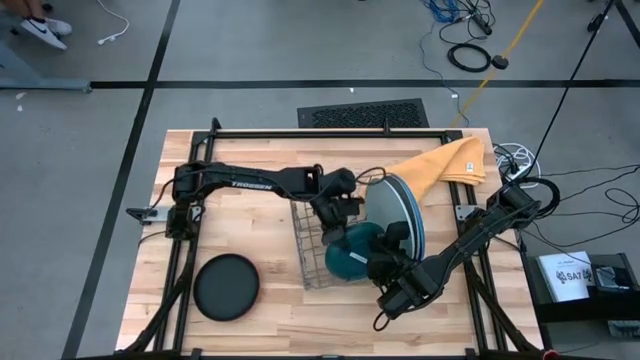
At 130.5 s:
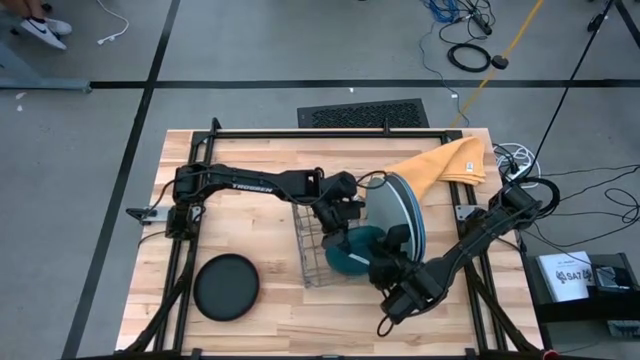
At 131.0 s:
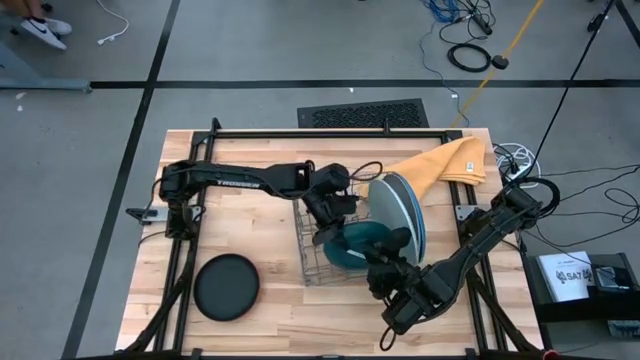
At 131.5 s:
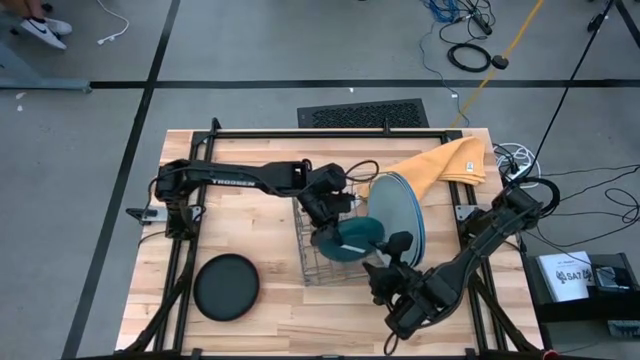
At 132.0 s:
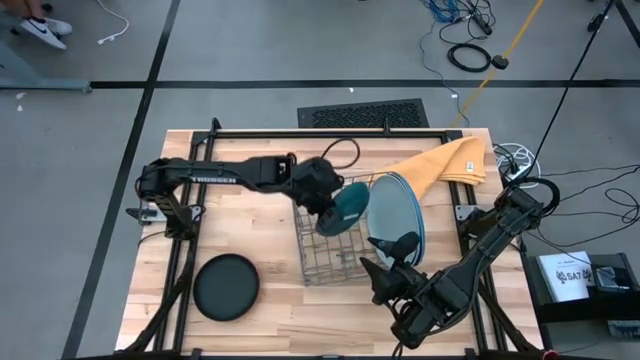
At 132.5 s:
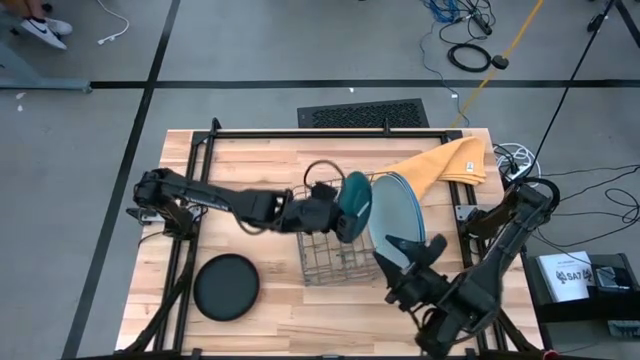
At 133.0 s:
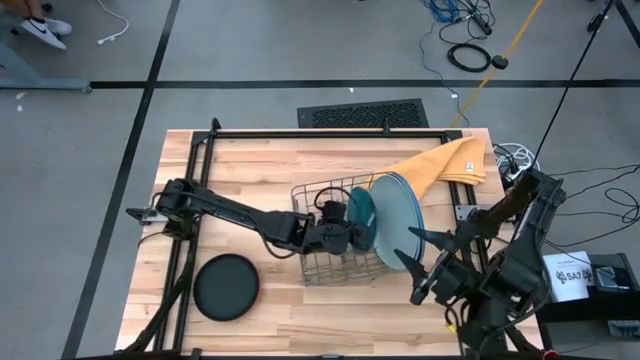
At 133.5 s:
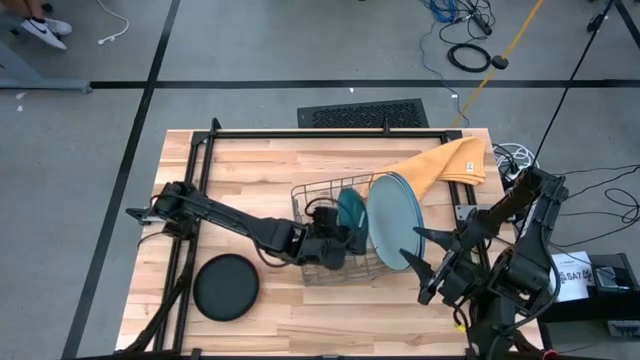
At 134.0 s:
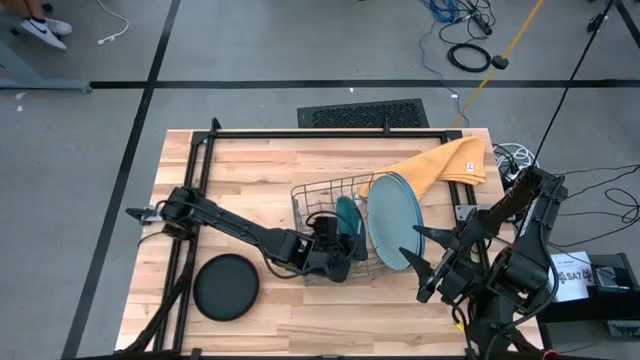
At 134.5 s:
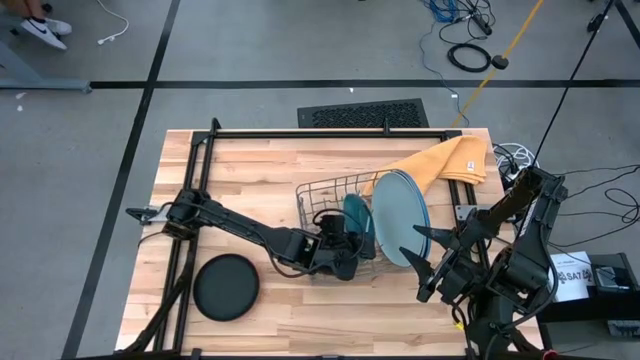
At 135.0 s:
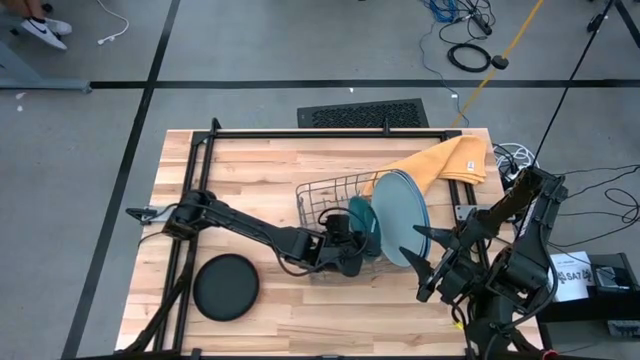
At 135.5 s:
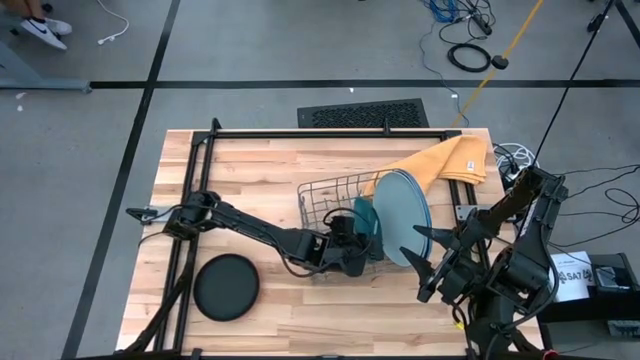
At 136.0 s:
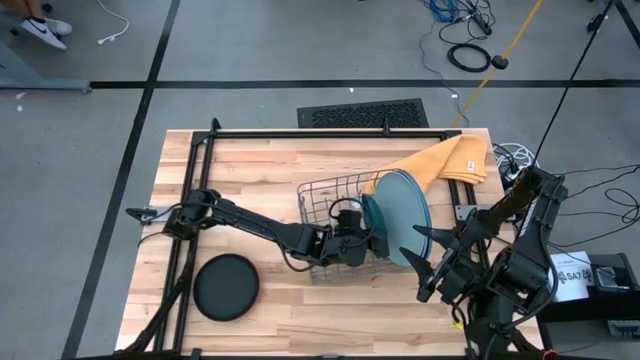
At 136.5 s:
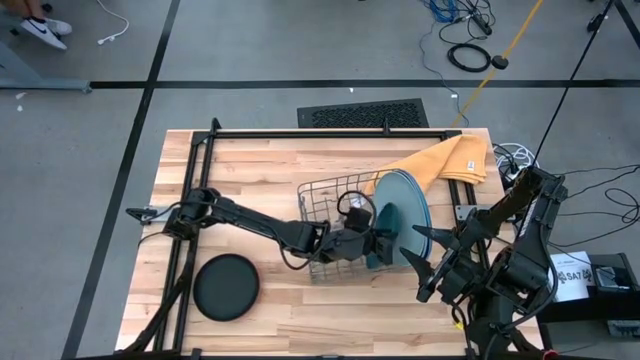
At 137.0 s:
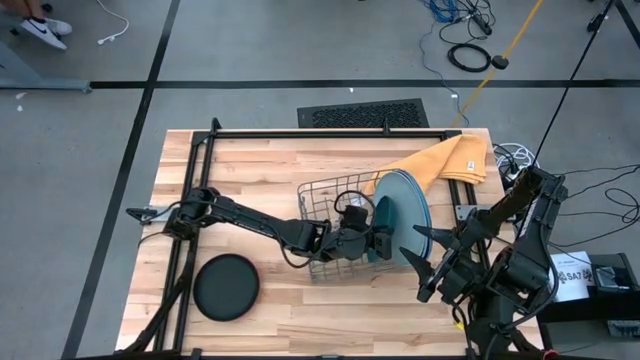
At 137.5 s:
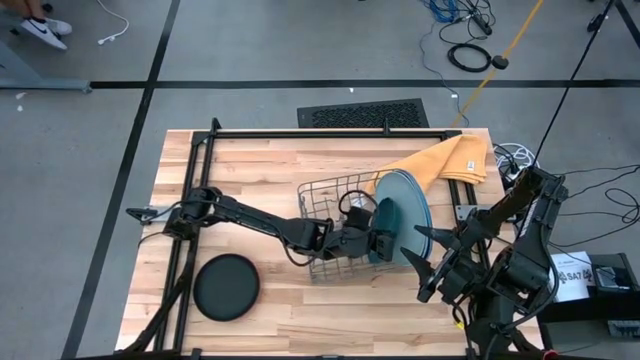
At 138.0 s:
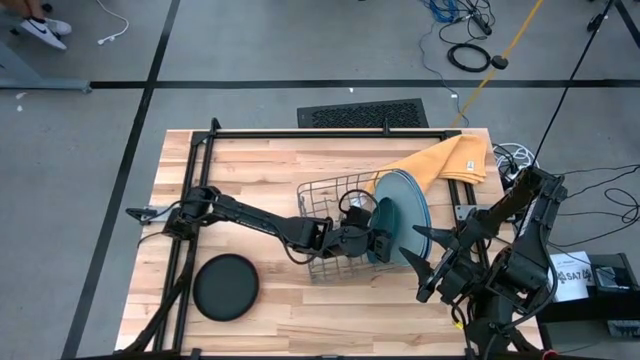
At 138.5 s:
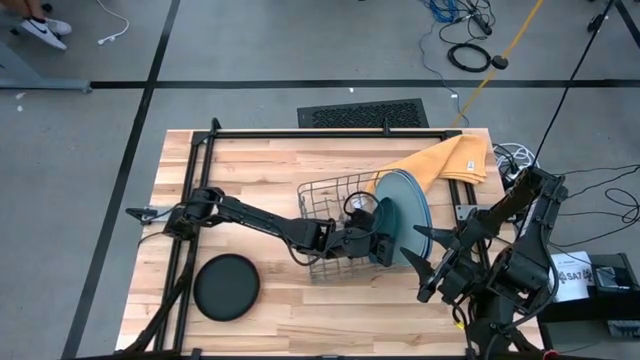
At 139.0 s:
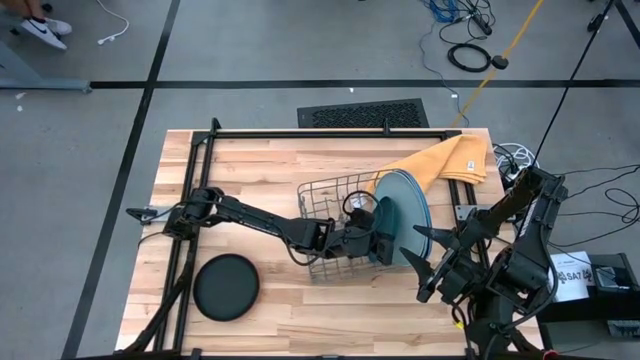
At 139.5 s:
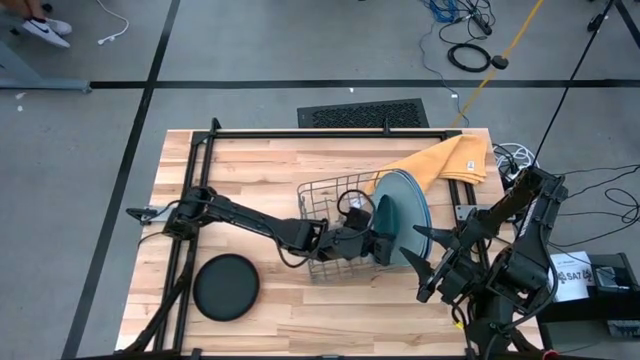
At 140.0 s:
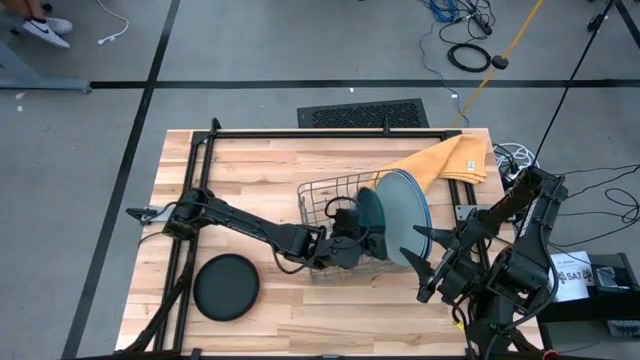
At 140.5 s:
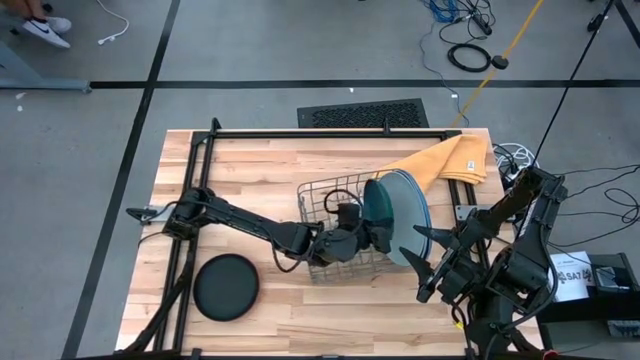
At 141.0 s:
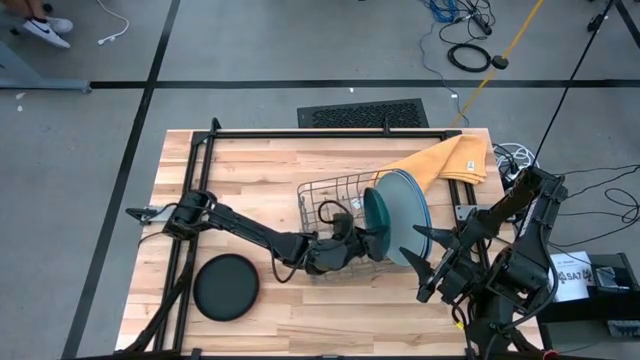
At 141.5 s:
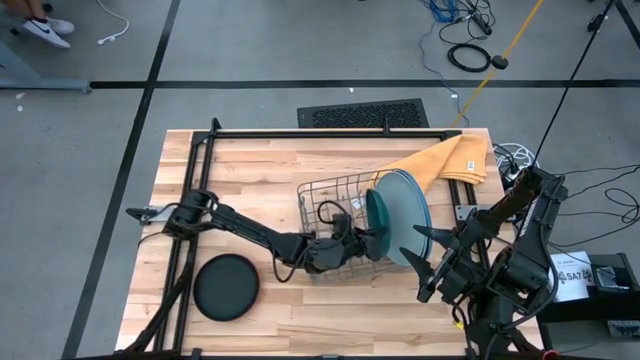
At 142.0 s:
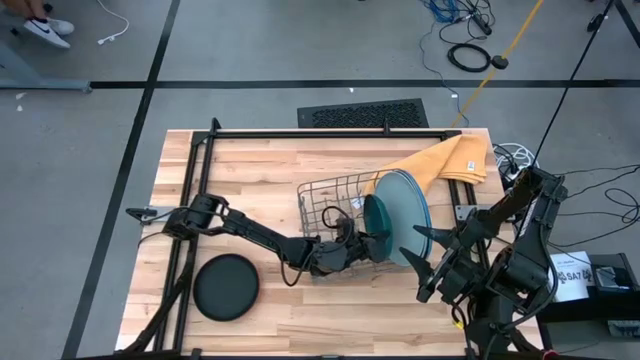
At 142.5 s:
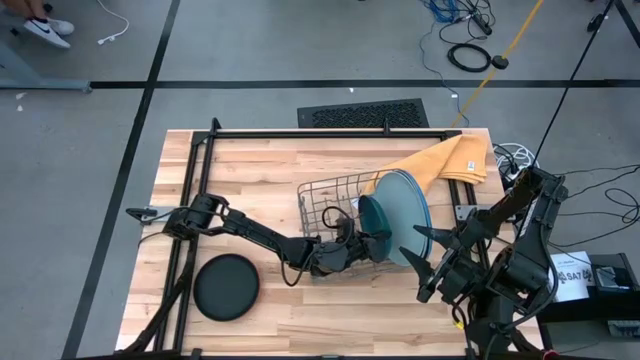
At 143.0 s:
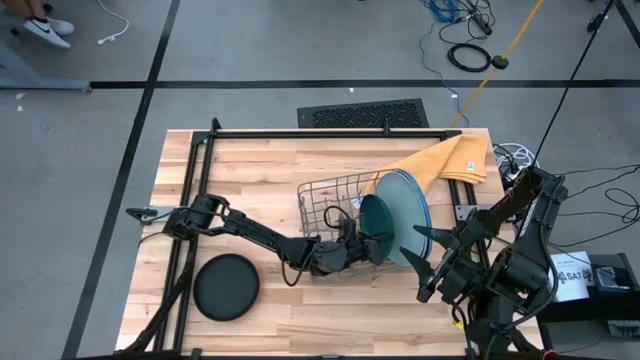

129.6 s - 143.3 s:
Task: Sort dishes
Put the dark green plate into the green dish rack

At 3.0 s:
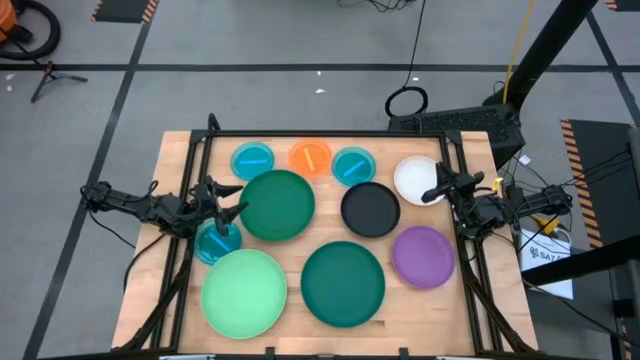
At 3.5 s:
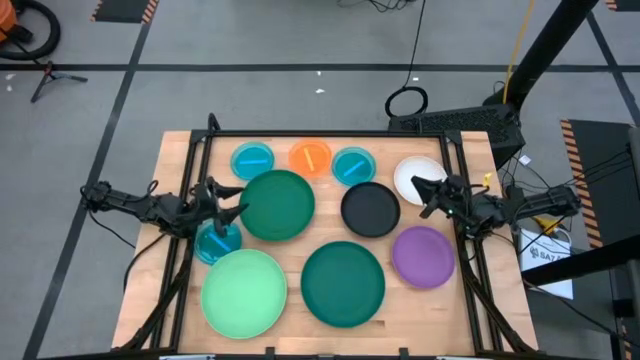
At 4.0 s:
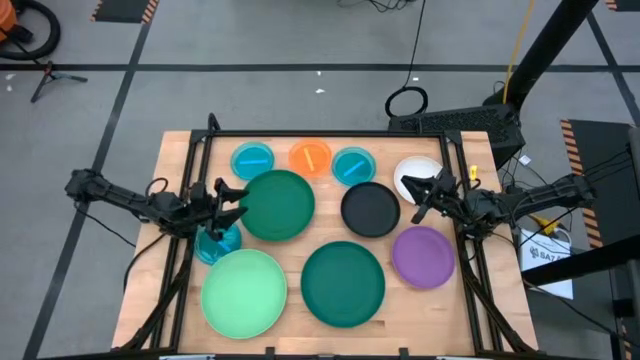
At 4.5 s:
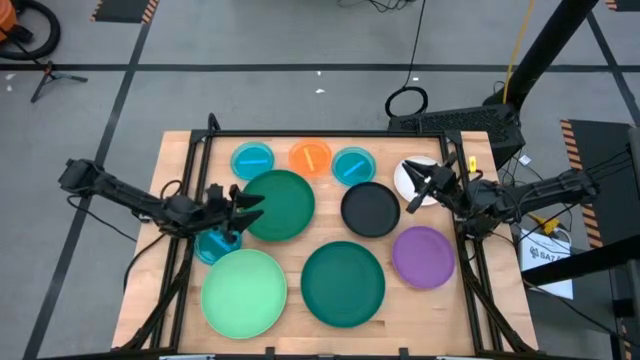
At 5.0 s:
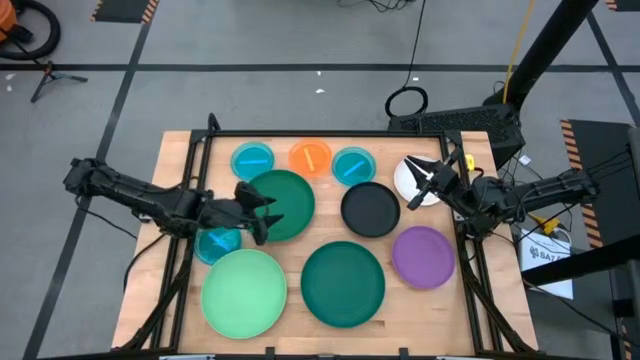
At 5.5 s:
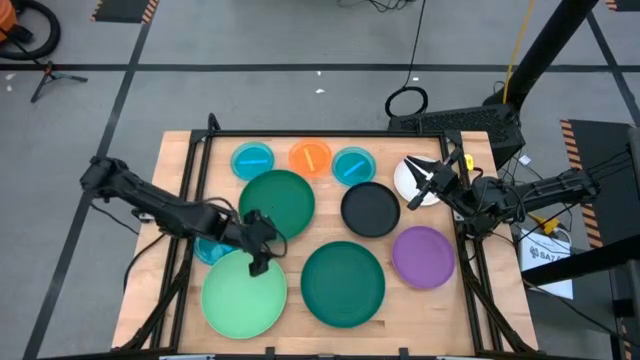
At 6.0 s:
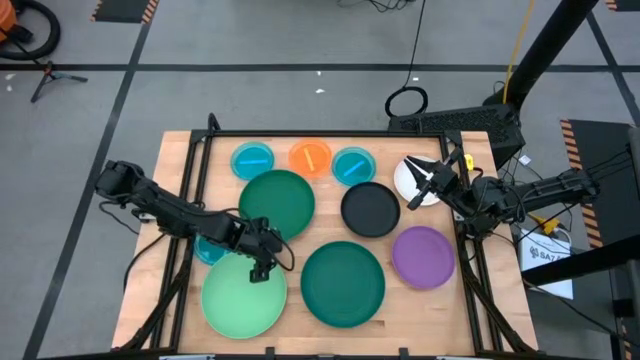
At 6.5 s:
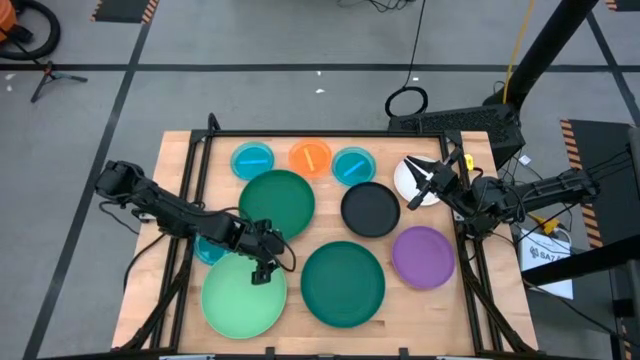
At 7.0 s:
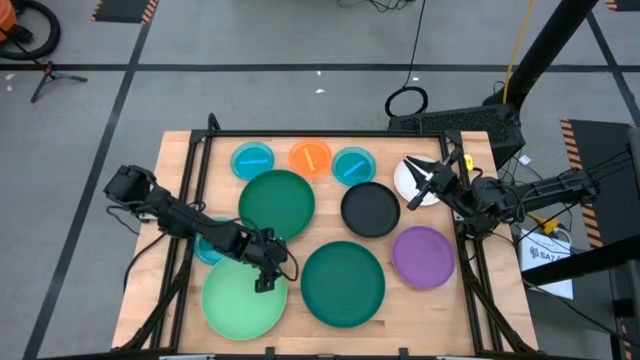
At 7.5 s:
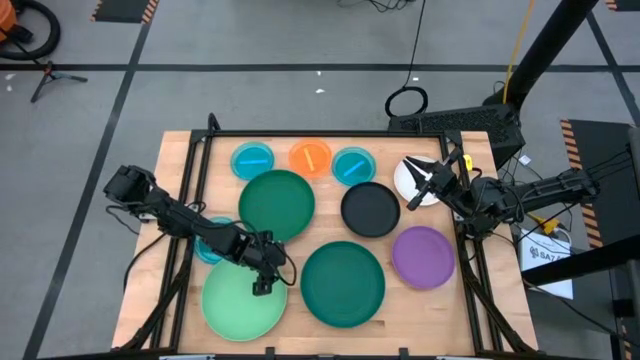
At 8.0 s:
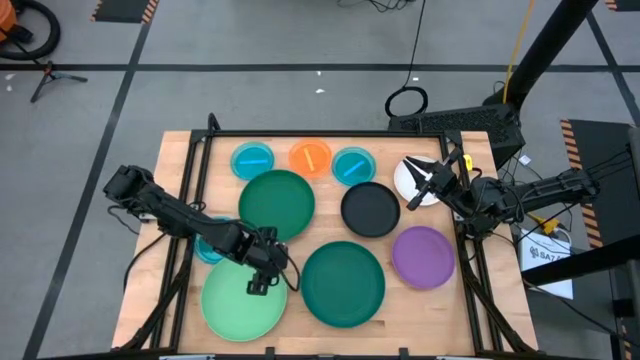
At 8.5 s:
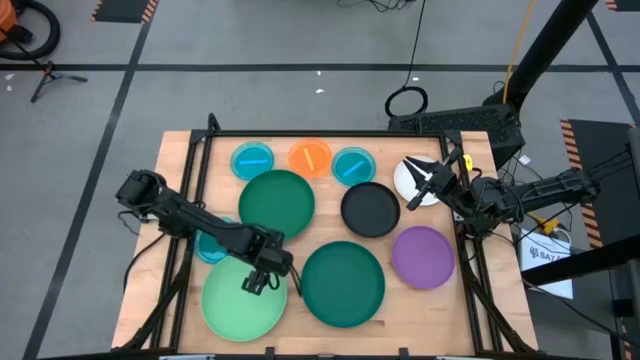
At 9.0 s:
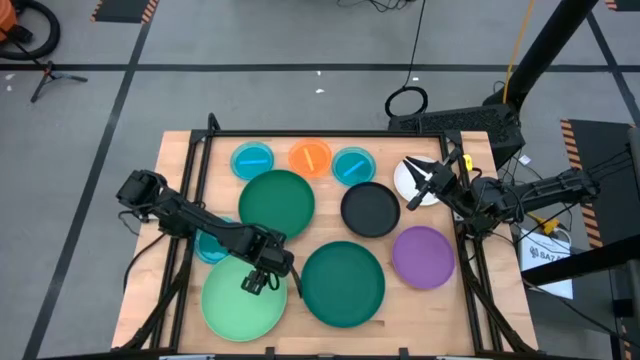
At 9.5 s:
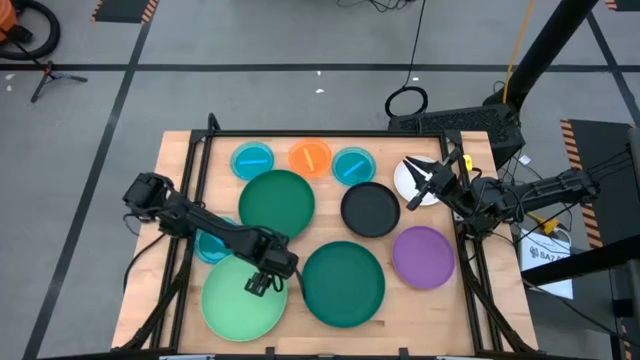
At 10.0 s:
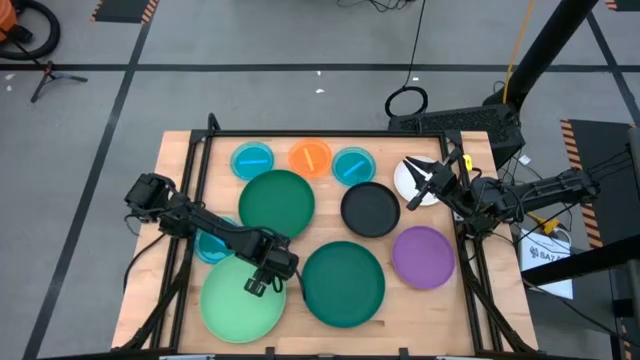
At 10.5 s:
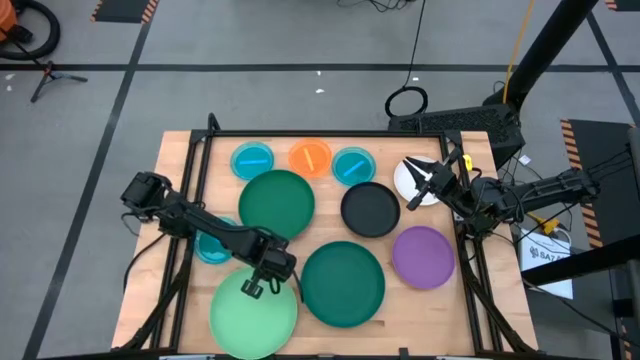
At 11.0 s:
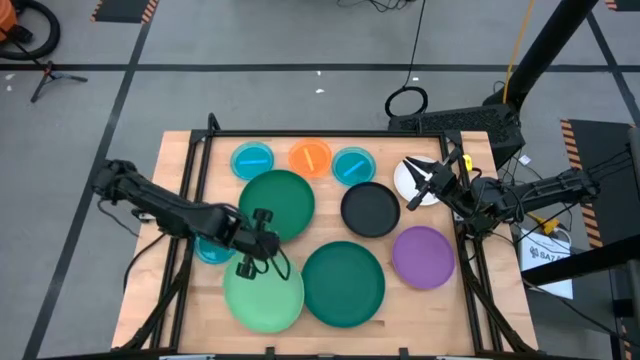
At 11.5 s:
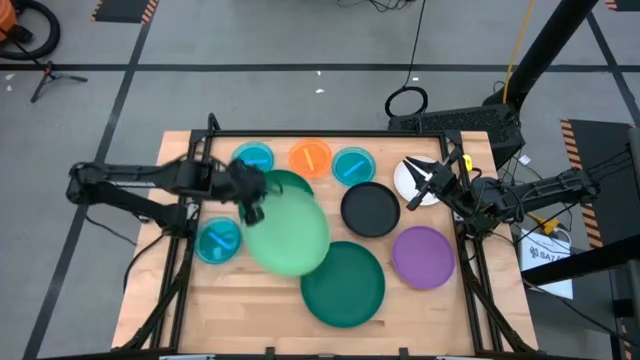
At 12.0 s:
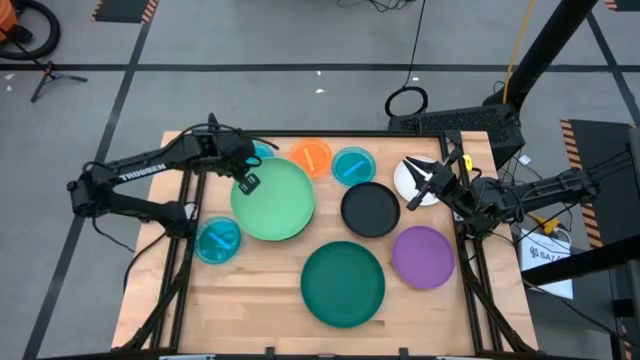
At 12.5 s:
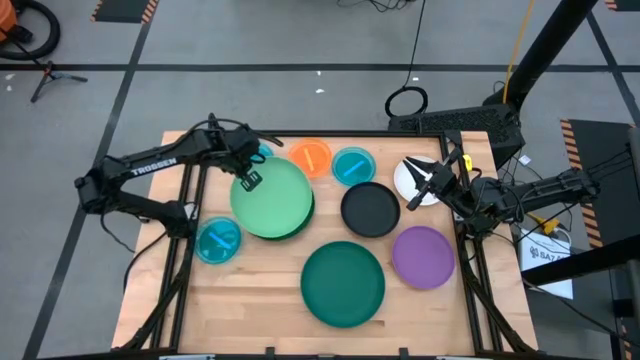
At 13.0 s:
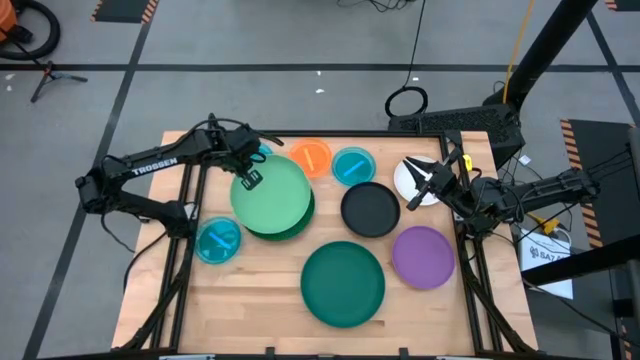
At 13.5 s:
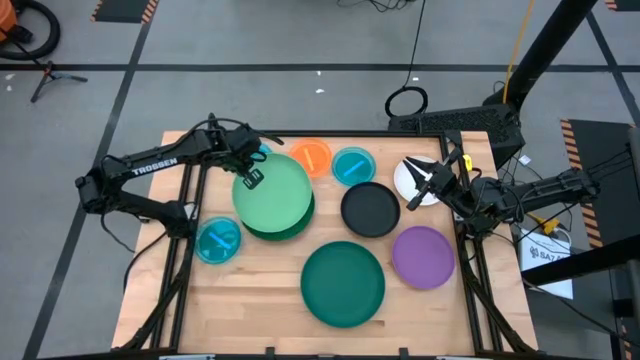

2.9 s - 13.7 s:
Task: Stack plastic plates
Stack the light green plate on top of the top green plate
